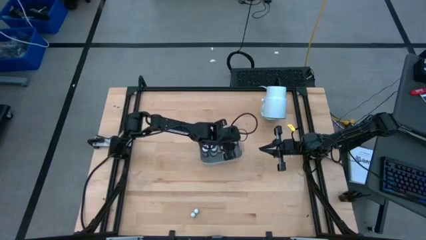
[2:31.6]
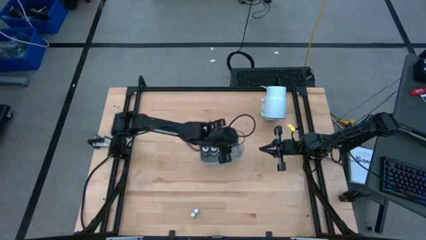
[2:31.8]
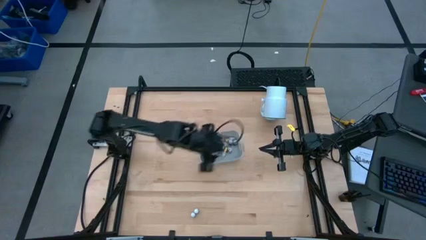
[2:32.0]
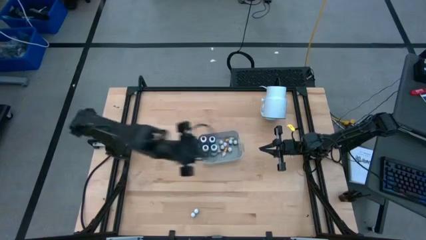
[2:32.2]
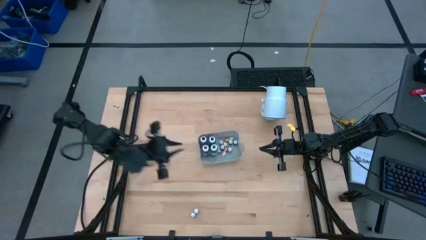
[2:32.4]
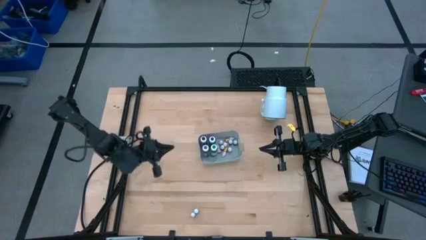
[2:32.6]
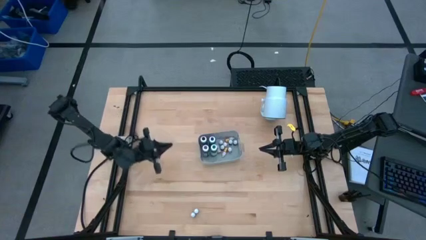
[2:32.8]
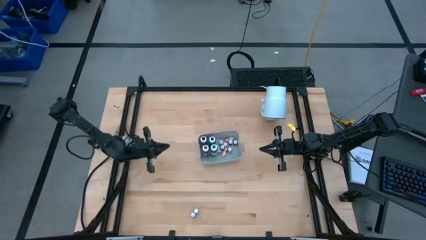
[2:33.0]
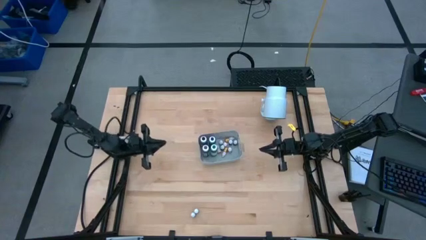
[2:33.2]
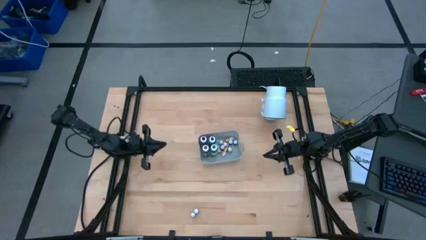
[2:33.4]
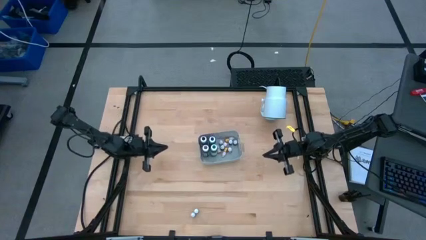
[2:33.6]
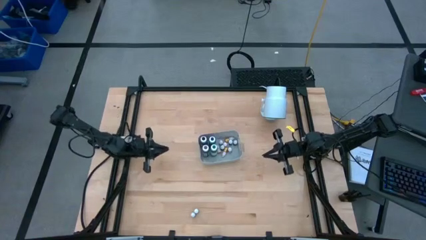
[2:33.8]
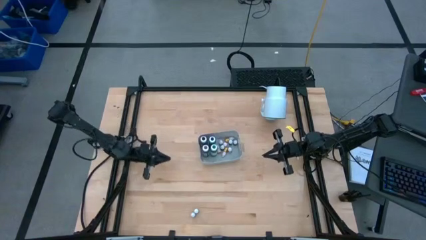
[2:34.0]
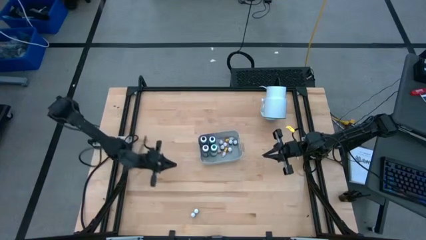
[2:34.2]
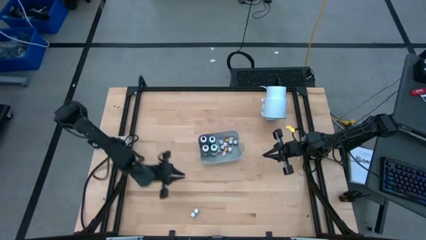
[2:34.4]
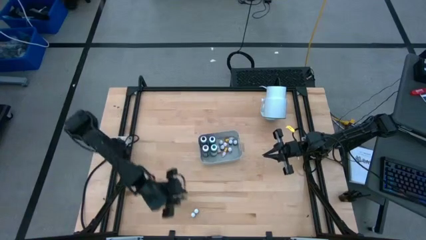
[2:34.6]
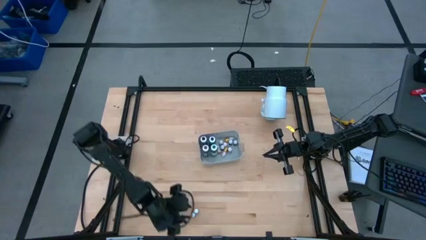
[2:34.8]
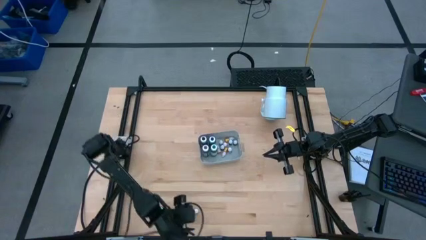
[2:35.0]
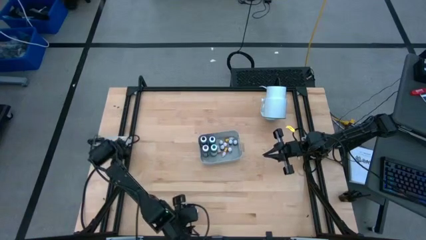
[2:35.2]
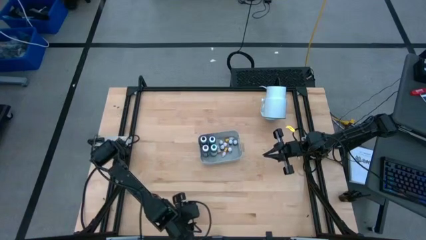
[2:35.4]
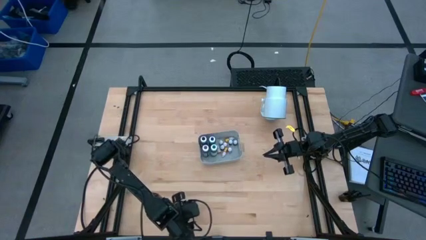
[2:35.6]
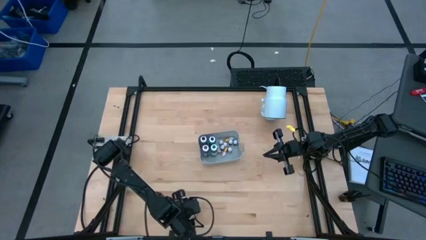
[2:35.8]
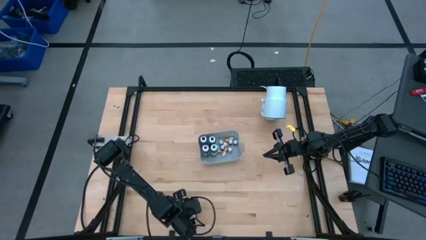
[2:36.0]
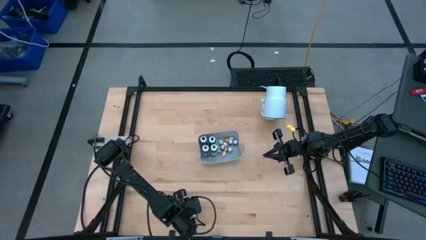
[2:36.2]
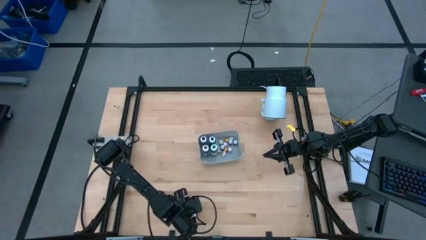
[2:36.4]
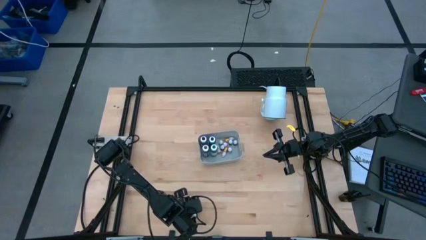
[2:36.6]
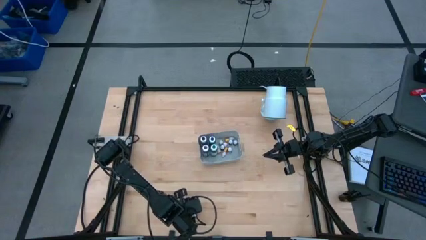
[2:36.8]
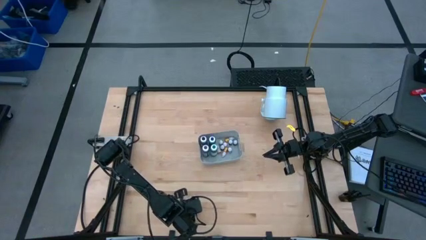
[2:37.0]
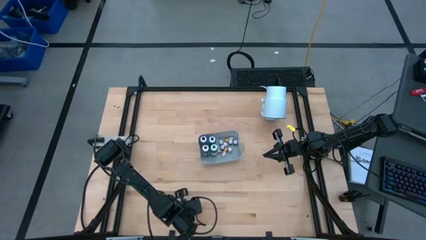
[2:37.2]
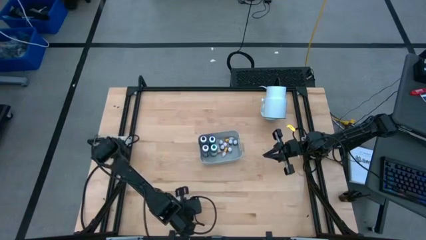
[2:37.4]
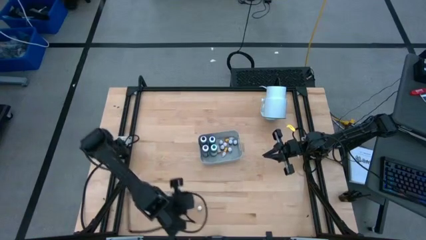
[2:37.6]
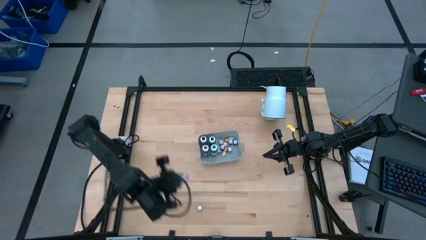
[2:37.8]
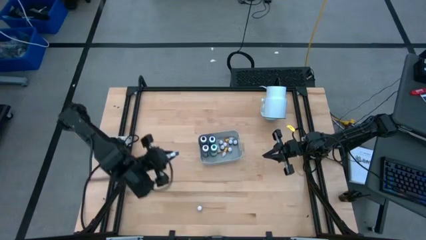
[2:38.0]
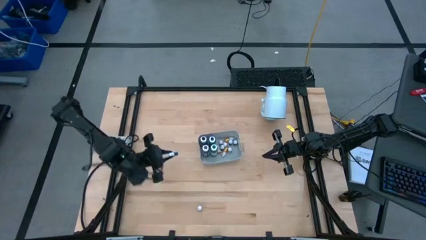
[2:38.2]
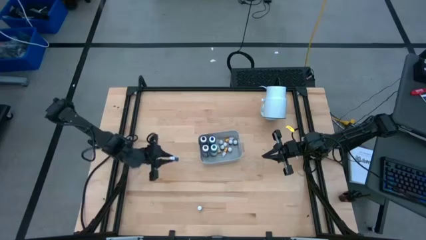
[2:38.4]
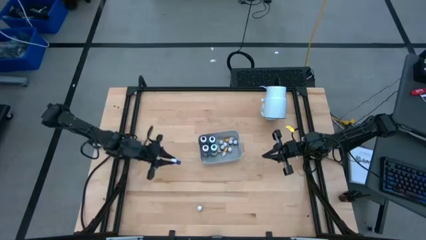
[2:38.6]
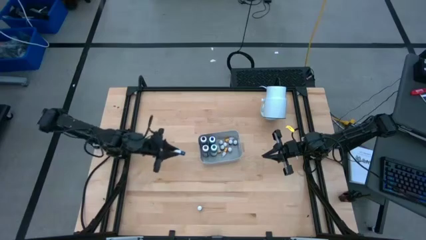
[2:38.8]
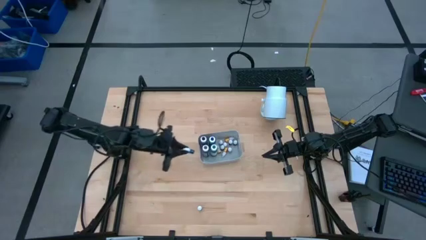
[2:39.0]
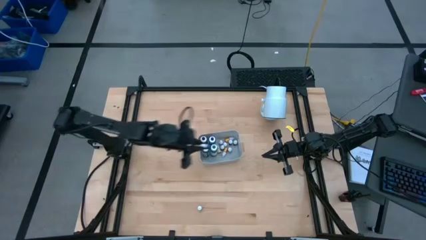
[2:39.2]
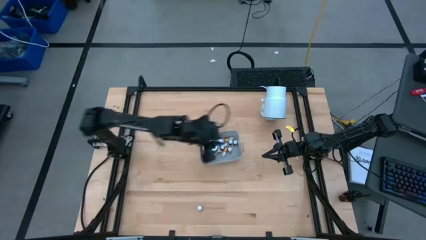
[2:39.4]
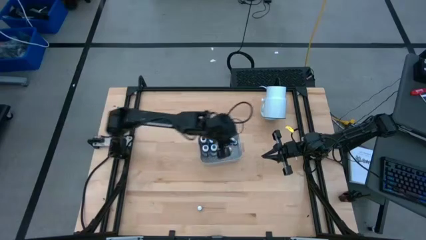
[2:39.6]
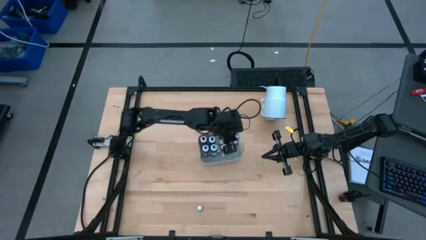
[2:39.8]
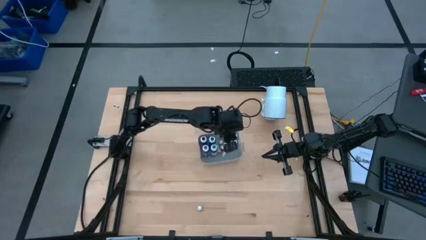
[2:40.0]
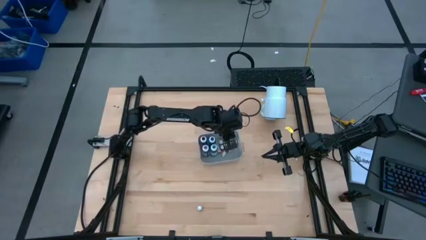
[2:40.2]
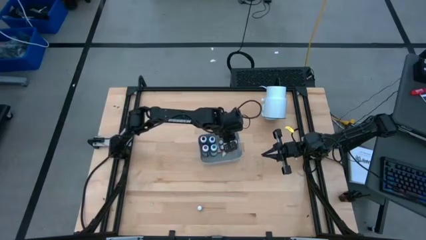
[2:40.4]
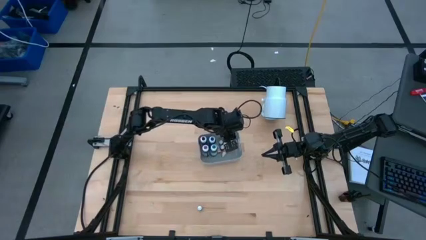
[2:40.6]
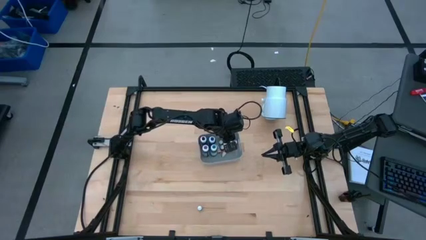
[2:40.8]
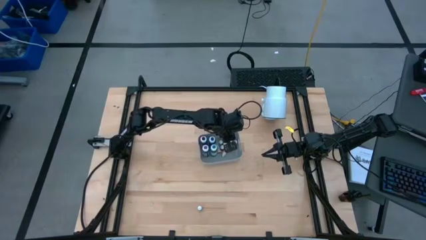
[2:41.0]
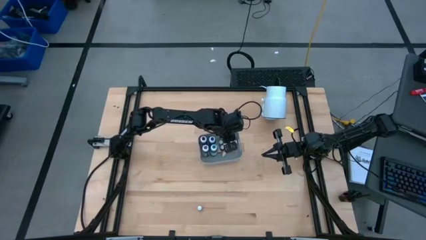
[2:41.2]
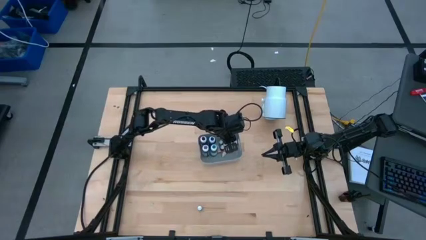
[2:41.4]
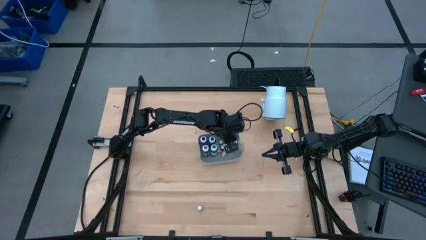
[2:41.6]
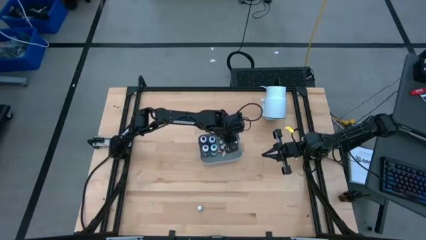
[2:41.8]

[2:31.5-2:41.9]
Task: Pick & Place food coloring
Put the small blue food coloring bottle into the white bin

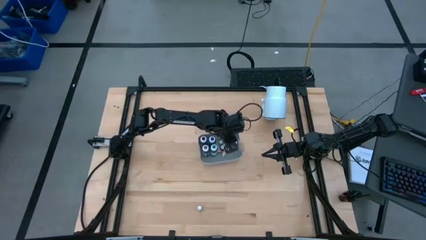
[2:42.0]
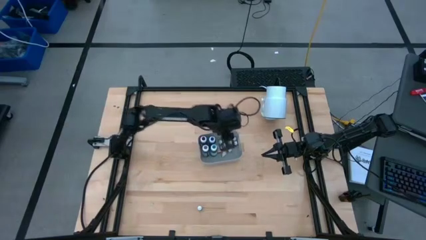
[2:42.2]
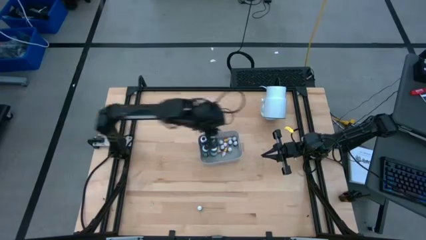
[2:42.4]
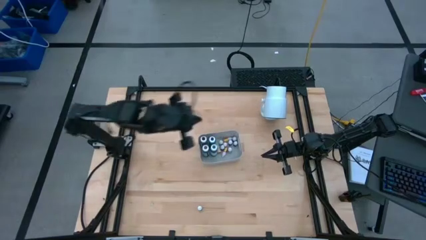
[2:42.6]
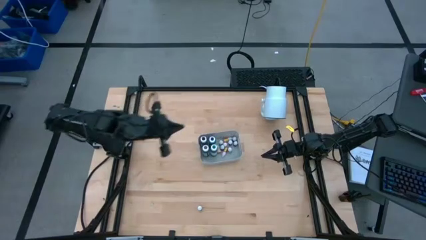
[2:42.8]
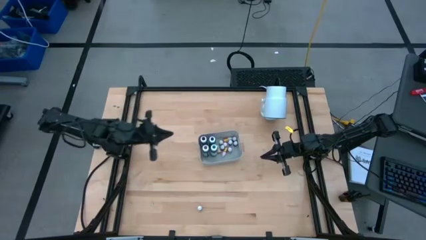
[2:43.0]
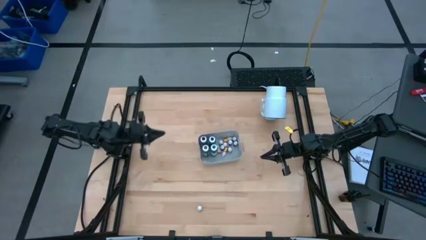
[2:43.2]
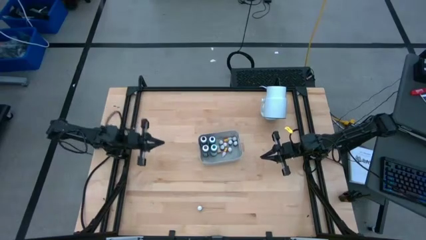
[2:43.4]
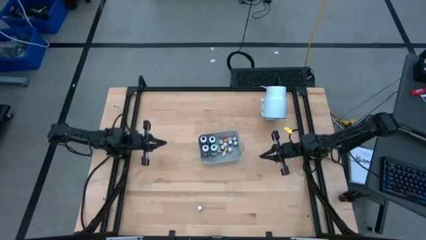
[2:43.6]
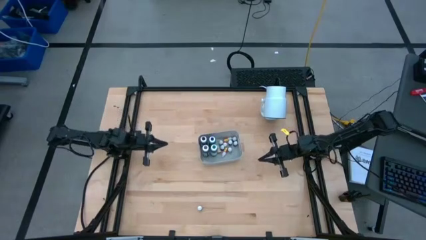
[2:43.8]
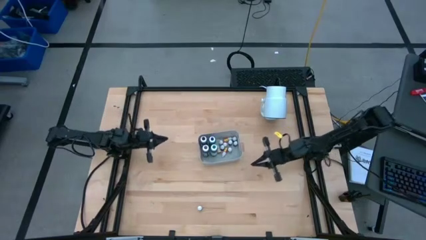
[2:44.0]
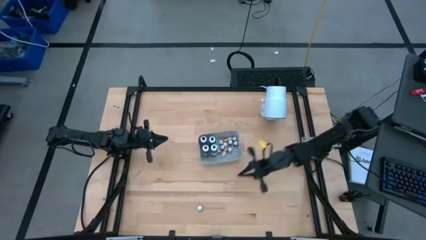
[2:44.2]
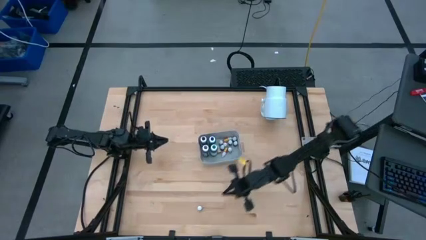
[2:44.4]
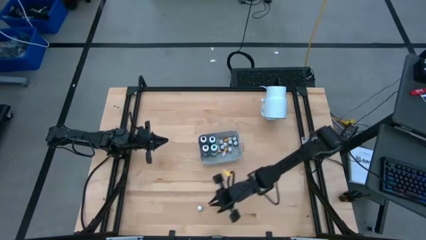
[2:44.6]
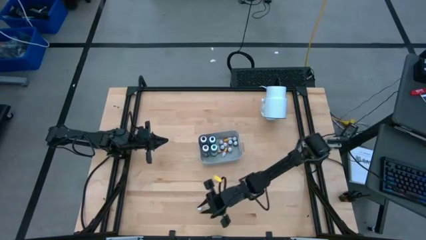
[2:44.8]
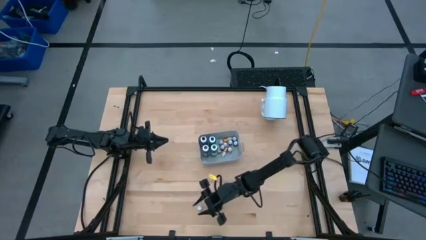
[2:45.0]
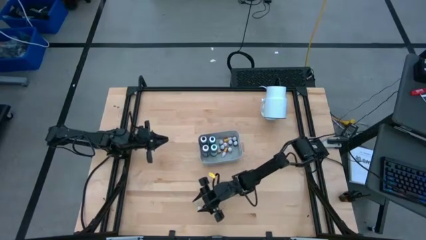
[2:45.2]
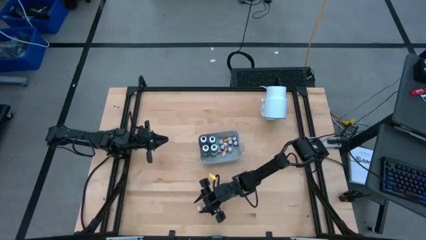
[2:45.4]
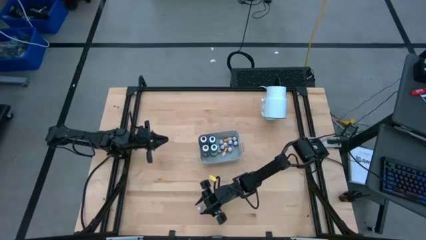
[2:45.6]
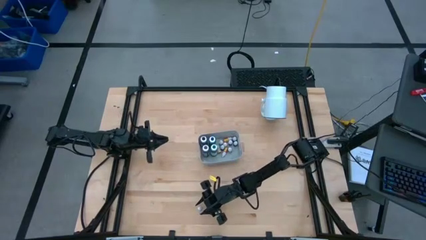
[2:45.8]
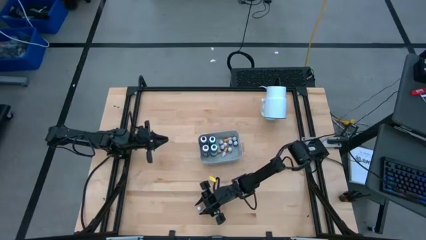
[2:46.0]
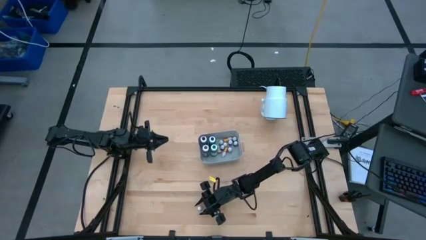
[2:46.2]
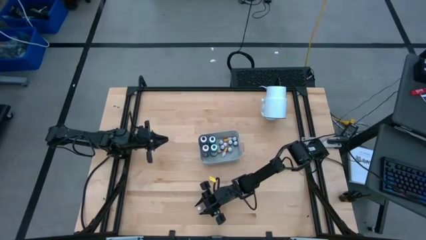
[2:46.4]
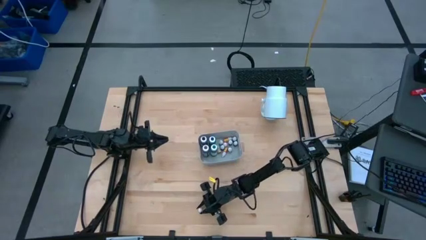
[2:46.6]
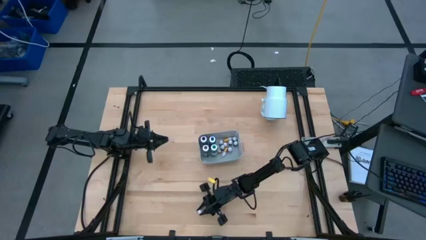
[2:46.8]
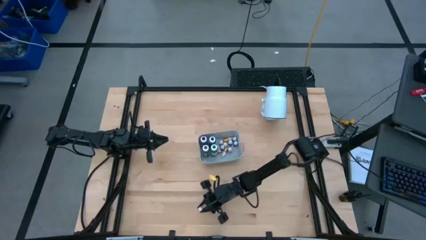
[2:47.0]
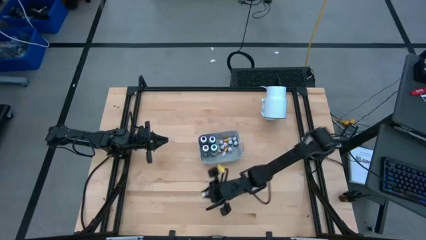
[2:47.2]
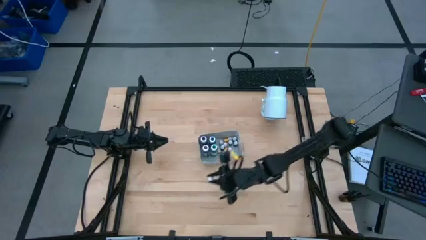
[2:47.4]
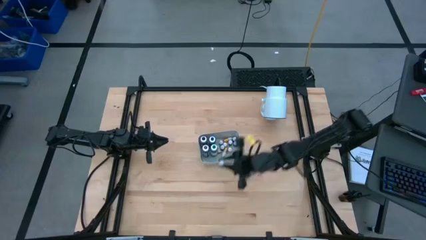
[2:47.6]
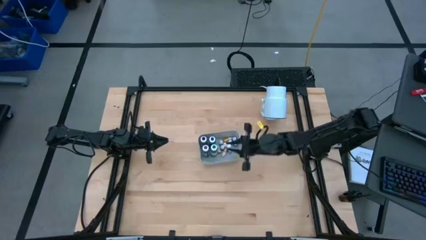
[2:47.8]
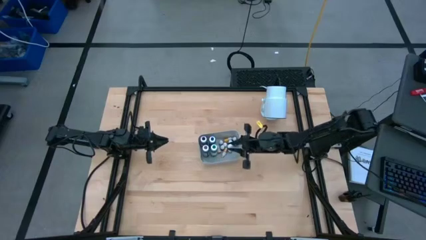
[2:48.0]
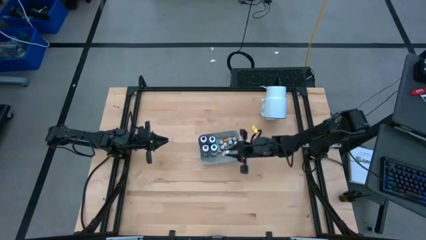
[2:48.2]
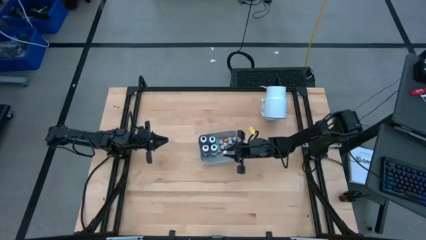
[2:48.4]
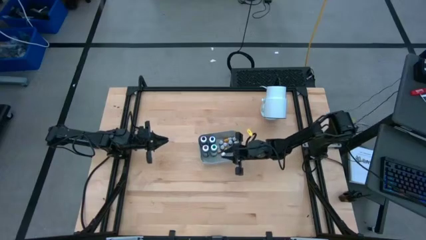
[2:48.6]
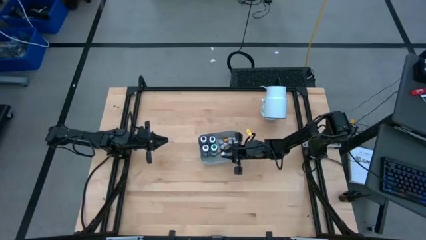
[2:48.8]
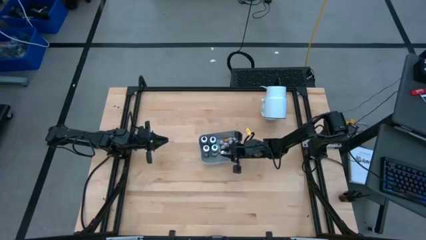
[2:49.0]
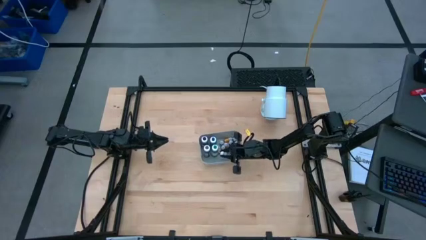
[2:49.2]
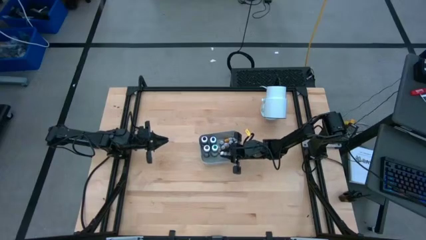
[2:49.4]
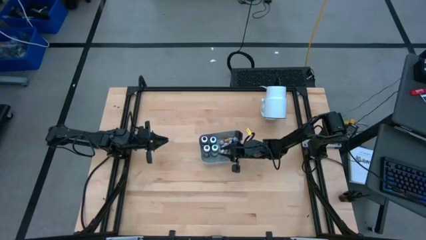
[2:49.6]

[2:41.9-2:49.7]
Put the small purple food coloring bottle into the white bin
